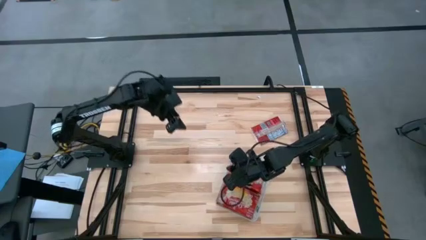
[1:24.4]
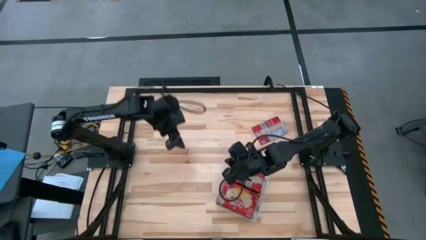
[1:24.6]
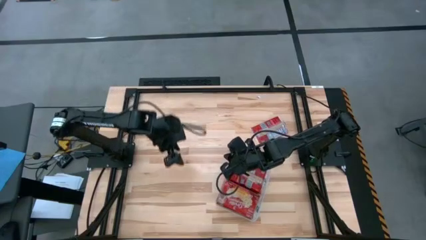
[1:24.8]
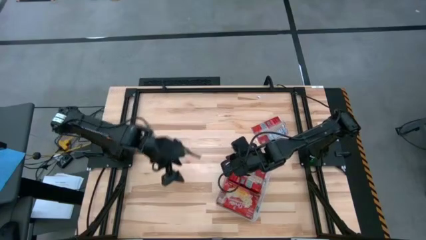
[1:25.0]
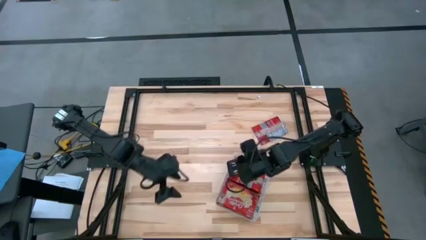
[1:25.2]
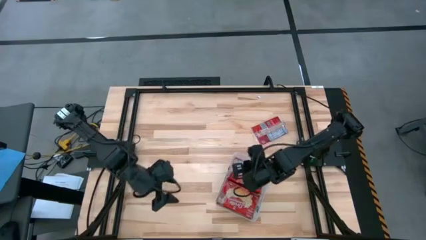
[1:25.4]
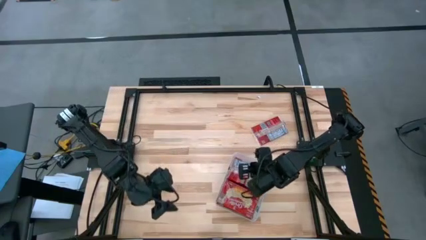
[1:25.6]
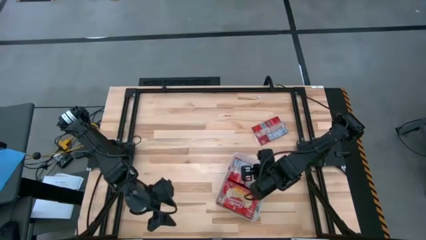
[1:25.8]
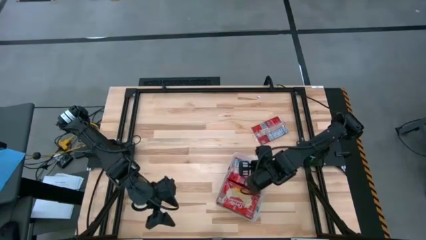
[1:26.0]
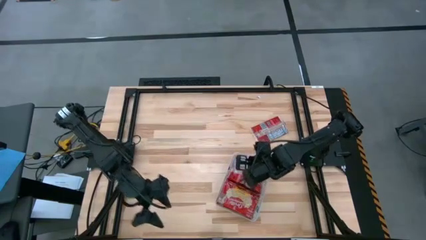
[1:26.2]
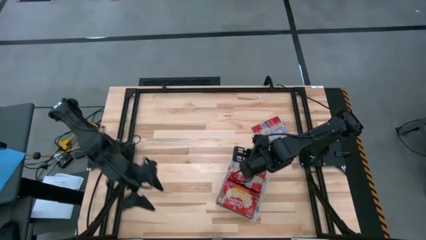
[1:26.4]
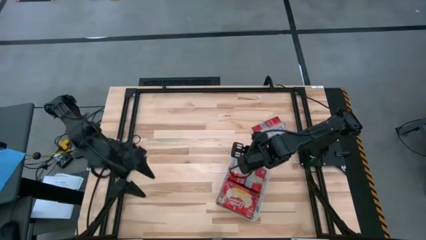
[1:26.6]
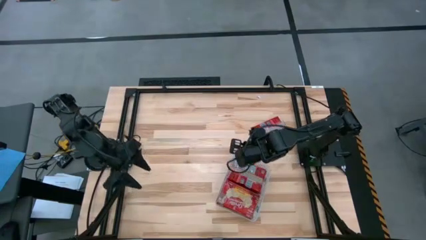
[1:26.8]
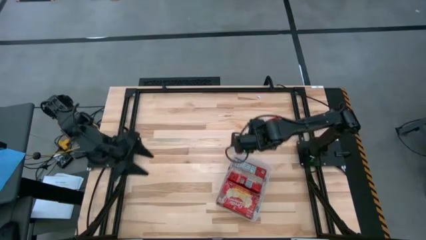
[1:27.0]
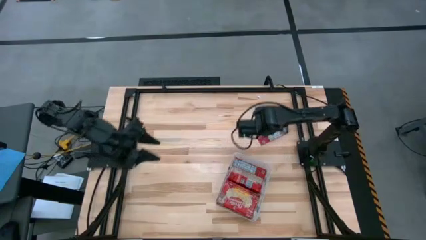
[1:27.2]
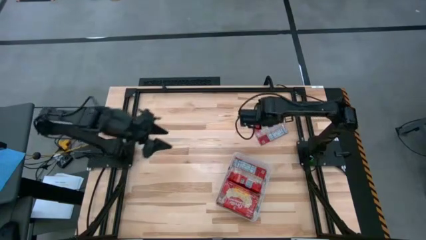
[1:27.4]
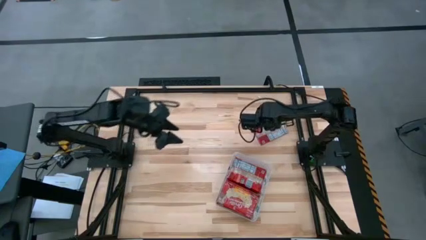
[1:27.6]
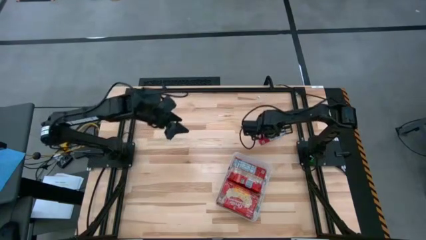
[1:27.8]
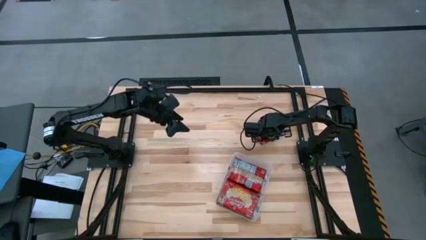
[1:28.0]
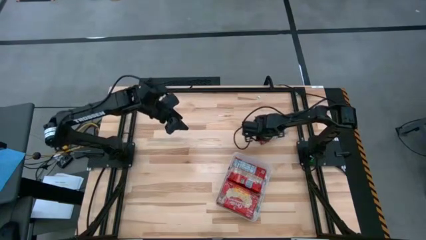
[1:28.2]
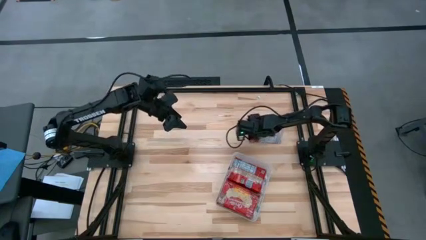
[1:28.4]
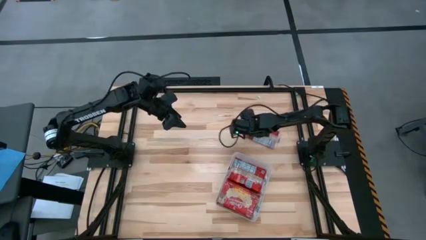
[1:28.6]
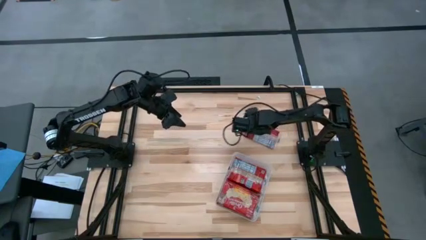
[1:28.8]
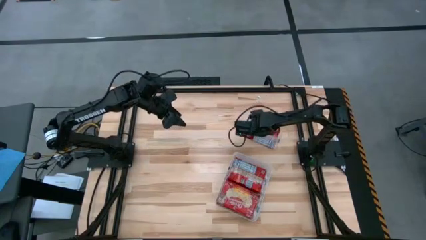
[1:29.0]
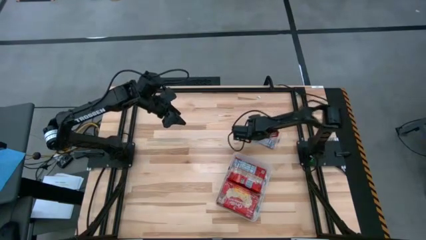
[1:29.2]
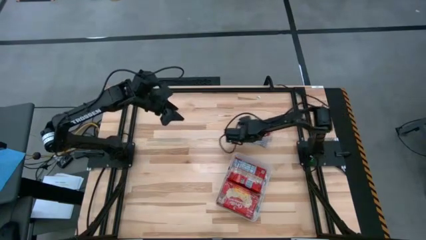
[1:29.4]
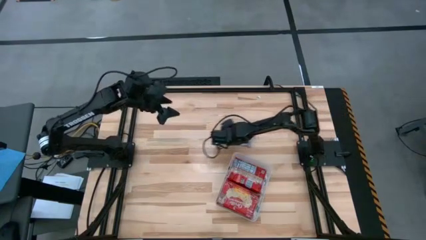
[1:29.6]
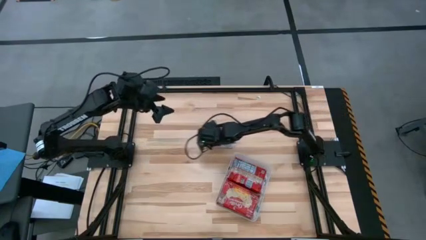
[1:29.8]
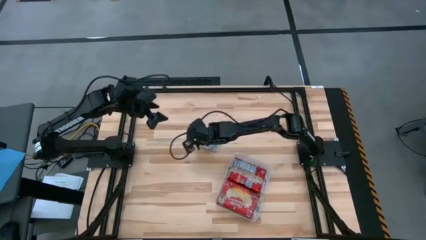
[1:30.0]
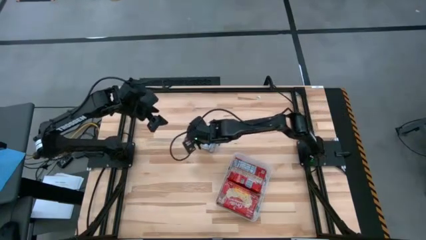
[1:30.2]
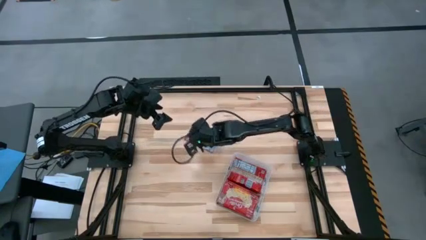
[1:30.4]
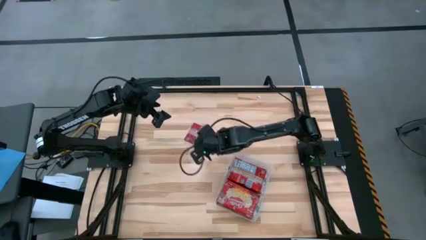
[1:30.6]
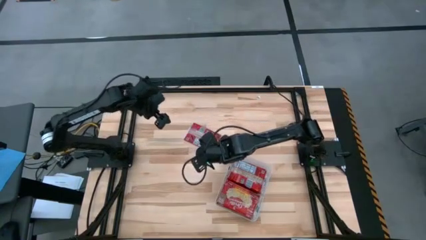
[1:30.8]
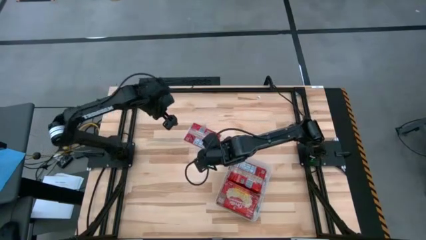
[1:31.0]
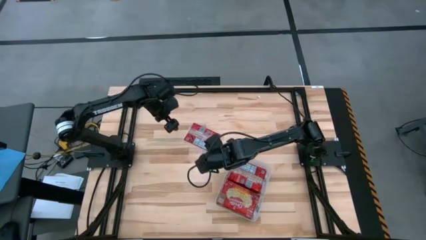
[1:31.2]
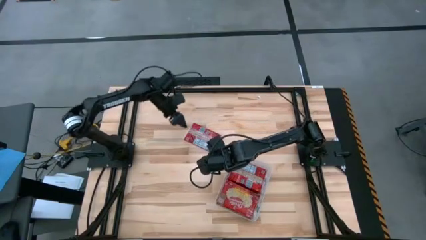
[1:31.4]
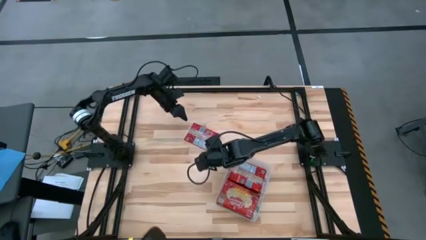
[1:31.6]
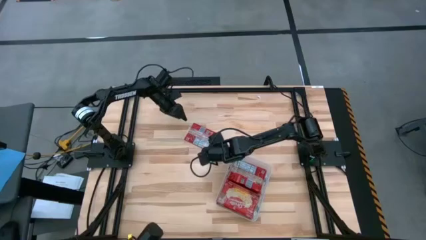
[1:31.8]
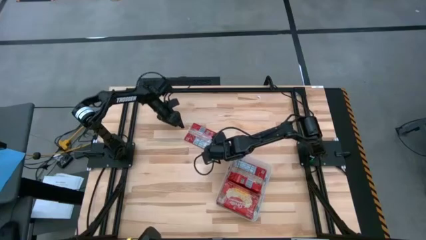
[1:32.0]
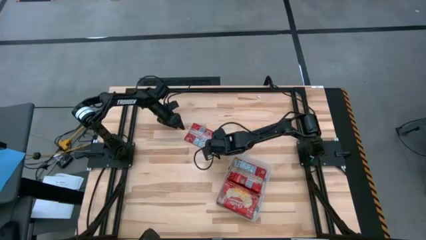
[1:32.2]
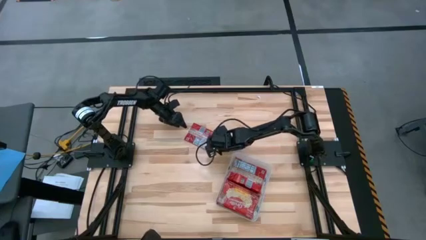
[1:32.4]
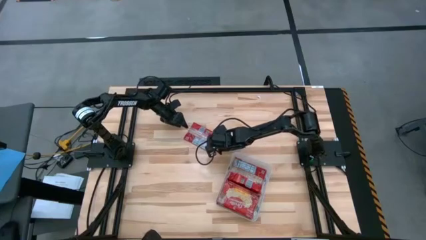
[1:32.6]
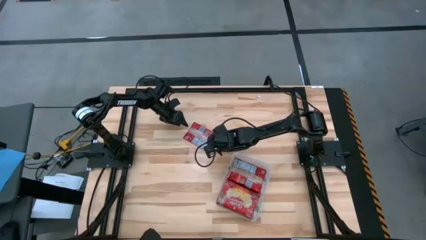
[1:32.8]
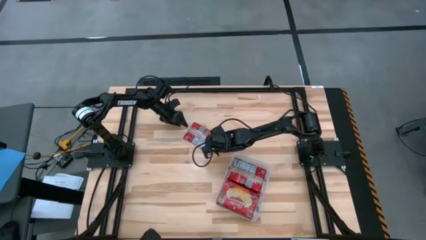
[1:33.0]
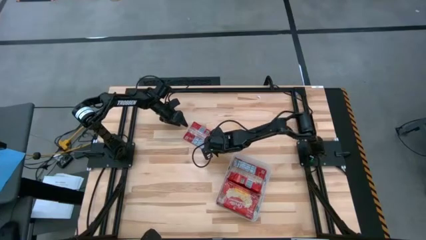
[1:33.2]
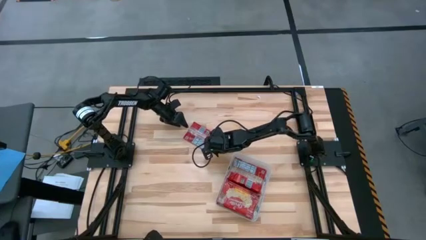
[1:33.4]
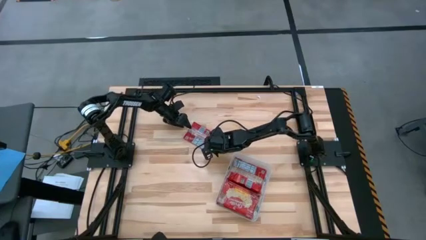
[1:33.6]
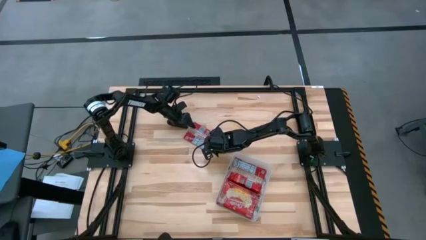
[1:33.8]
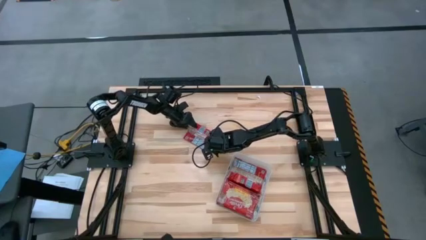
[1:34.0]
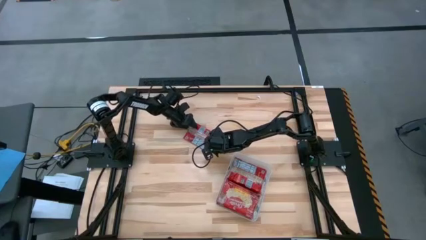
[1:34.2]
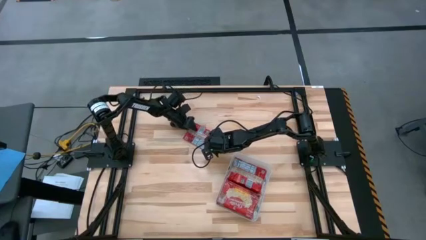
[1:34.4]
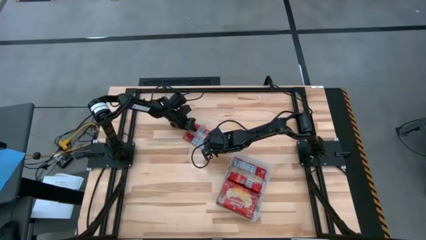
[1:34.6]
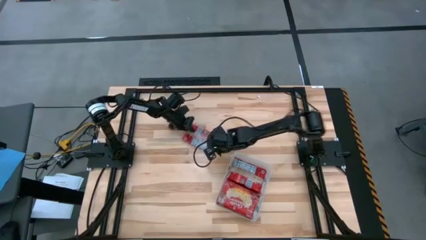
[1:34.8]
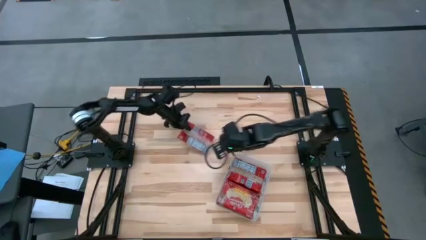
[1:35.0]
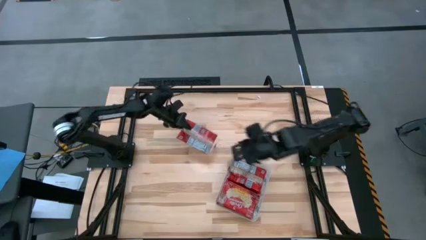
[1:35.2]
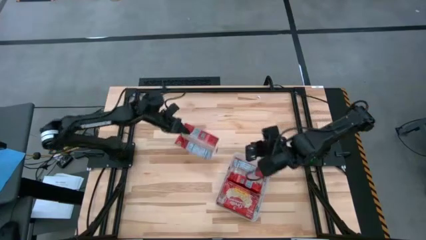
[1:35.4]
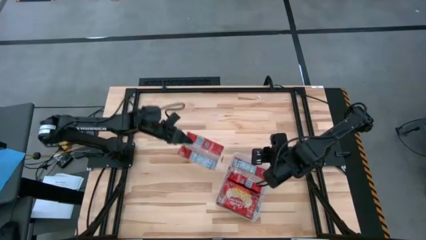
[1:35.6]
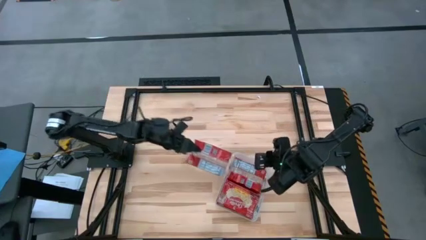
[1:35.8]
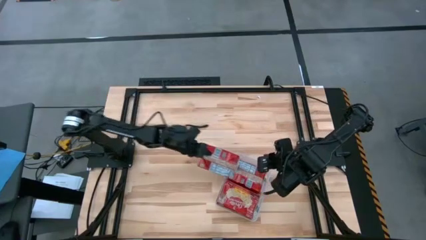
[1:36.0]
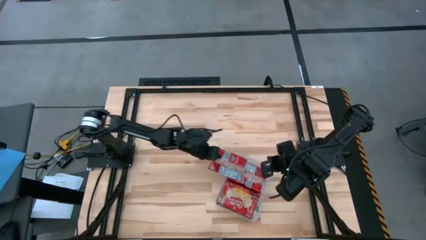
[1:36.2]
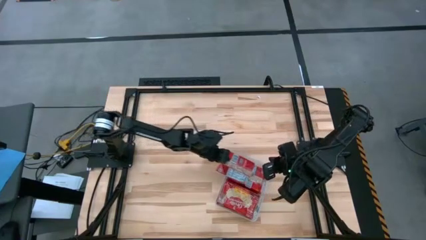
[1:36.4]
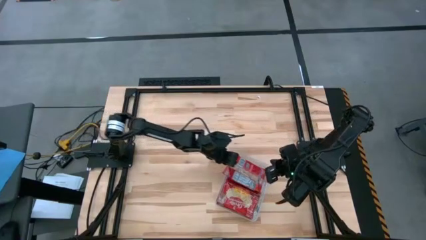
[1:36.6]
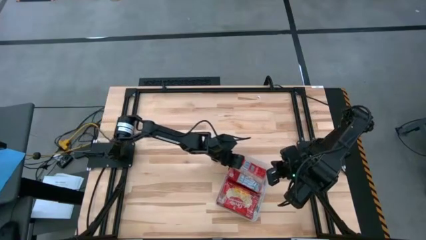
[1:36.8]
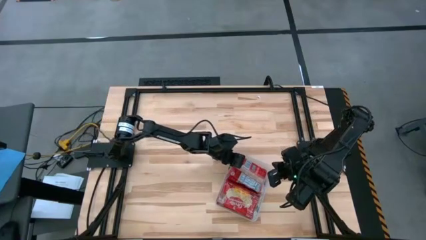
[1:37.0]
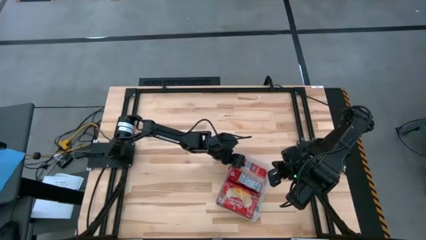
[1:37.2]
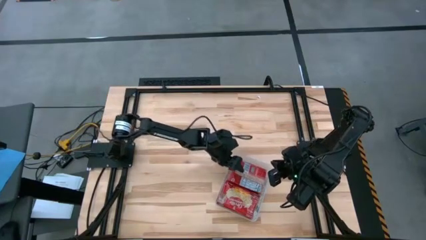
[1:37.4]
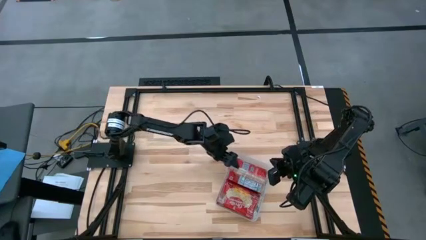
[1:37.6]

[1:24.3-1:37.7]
Task: Sort popcorn bags into baskets
Put the red popcorn bag into the transparent bin
